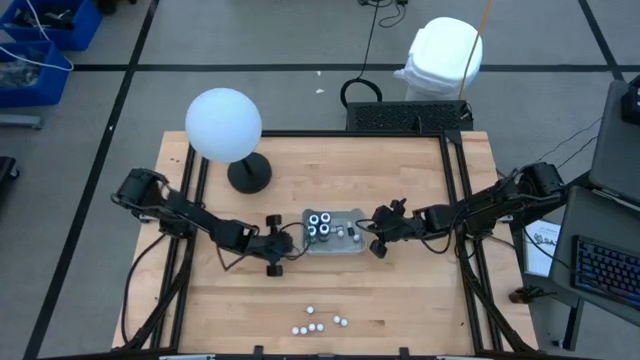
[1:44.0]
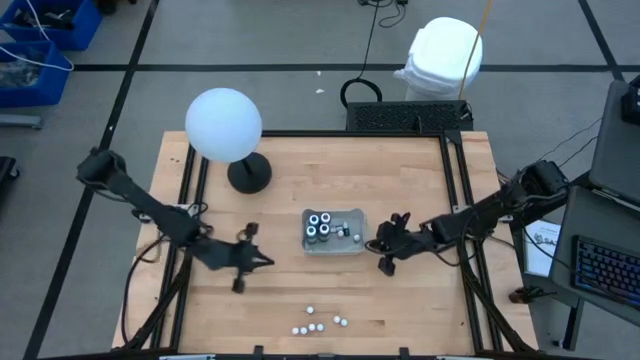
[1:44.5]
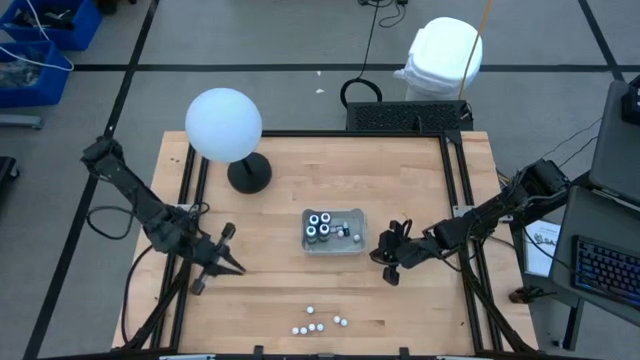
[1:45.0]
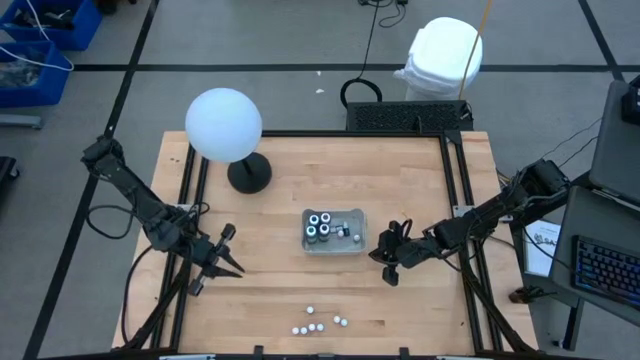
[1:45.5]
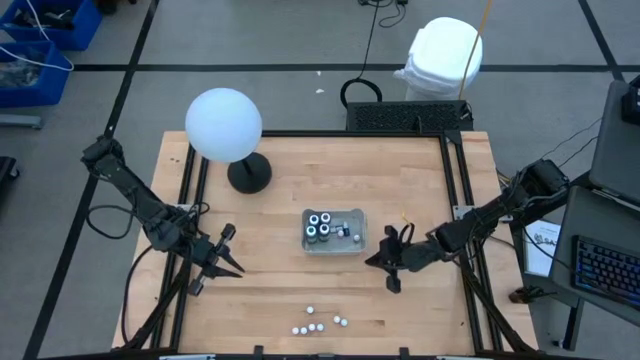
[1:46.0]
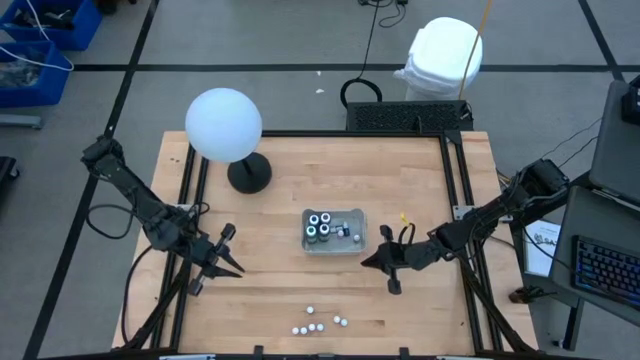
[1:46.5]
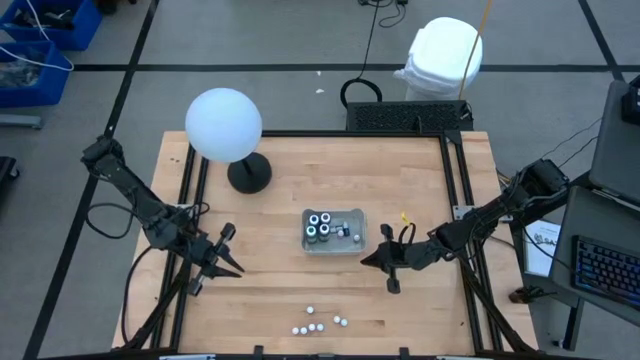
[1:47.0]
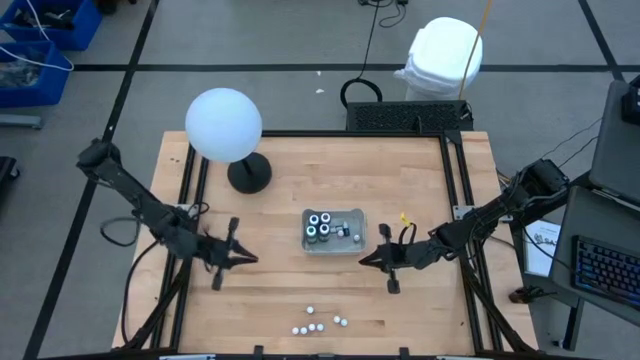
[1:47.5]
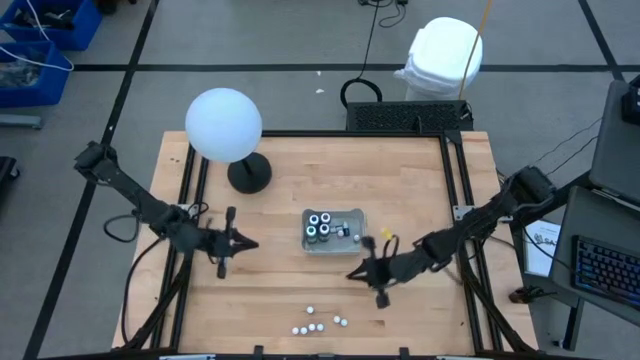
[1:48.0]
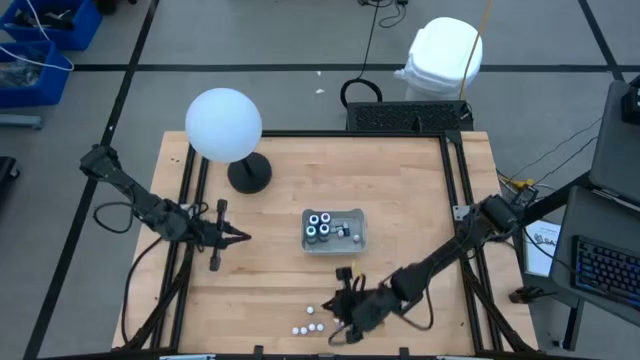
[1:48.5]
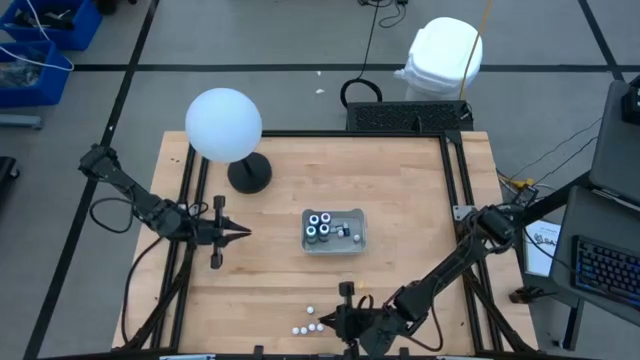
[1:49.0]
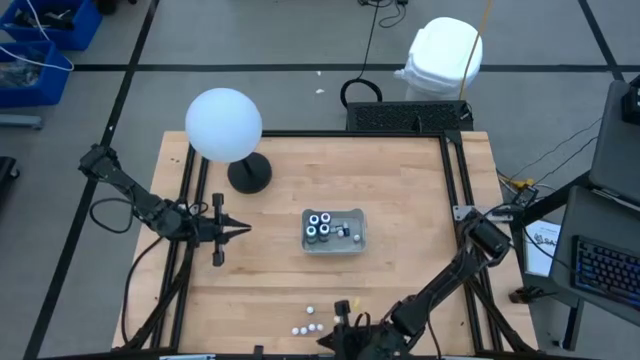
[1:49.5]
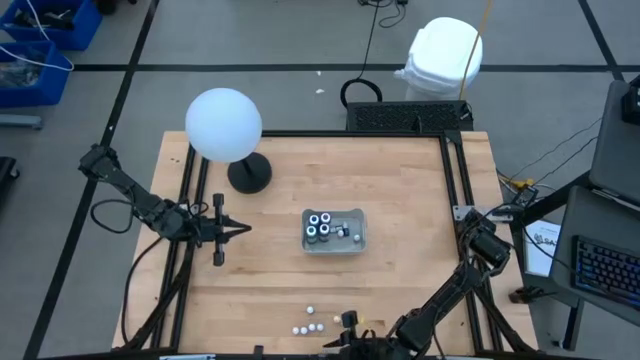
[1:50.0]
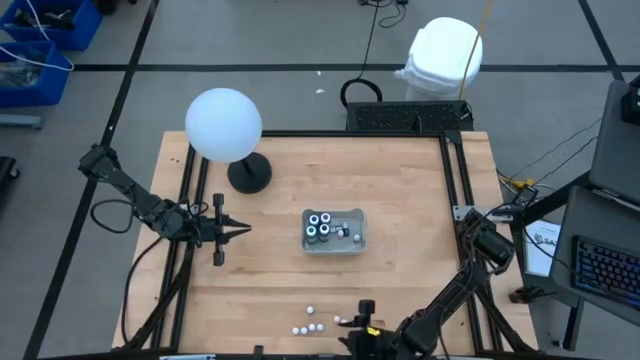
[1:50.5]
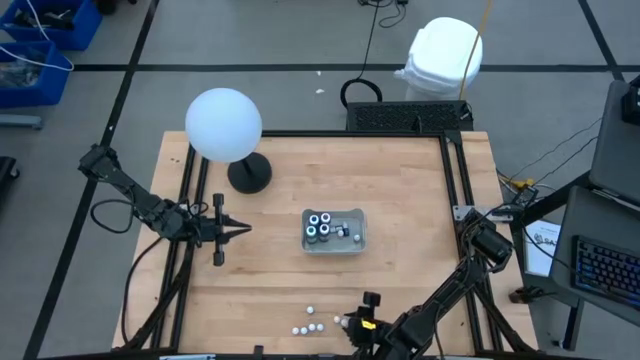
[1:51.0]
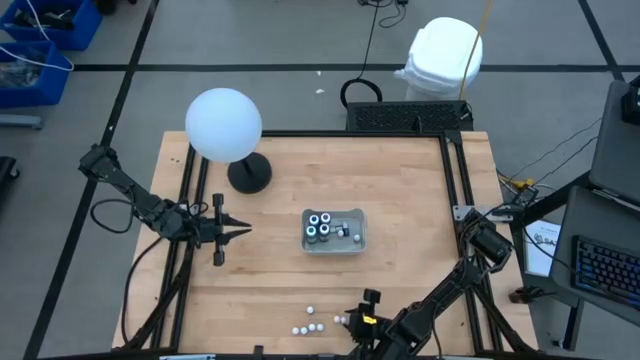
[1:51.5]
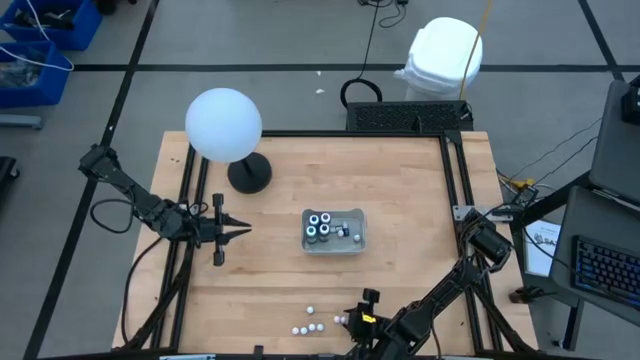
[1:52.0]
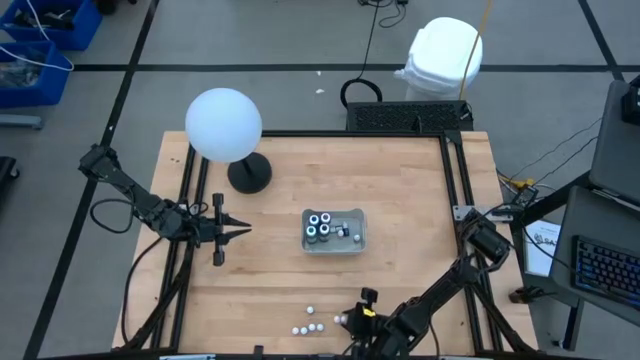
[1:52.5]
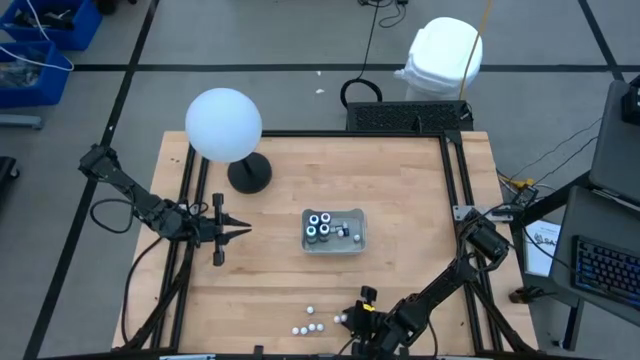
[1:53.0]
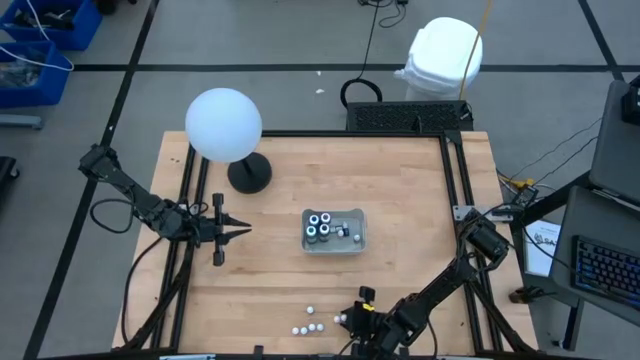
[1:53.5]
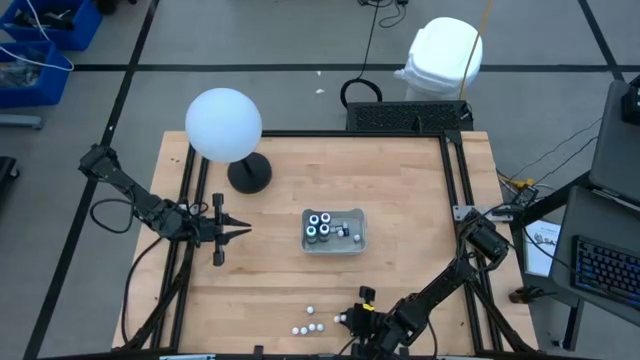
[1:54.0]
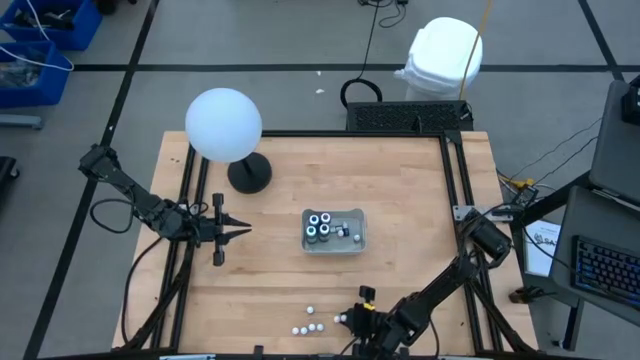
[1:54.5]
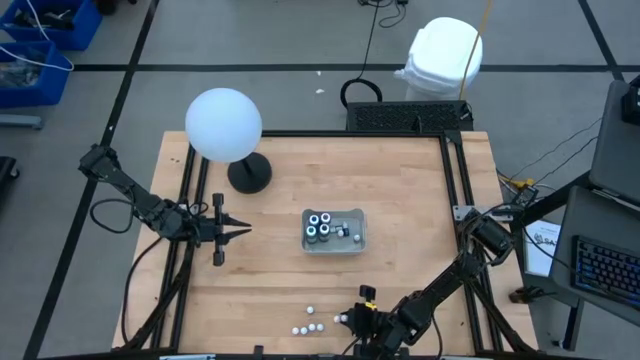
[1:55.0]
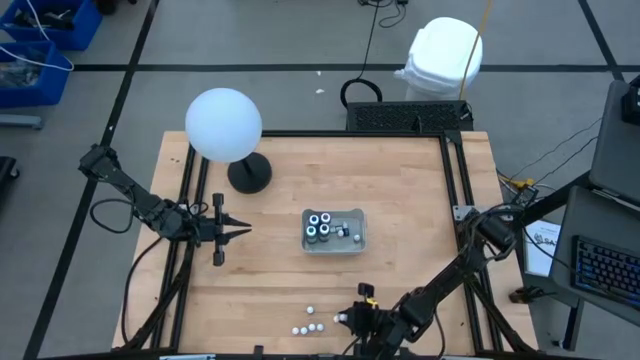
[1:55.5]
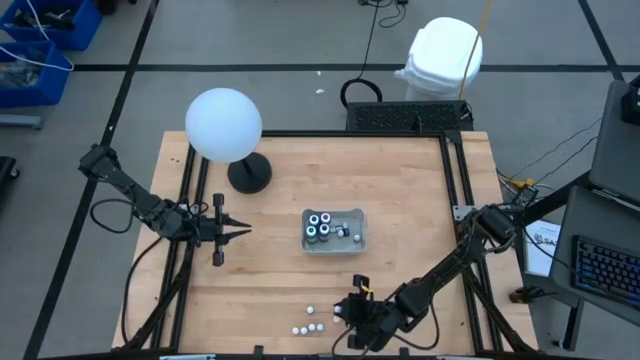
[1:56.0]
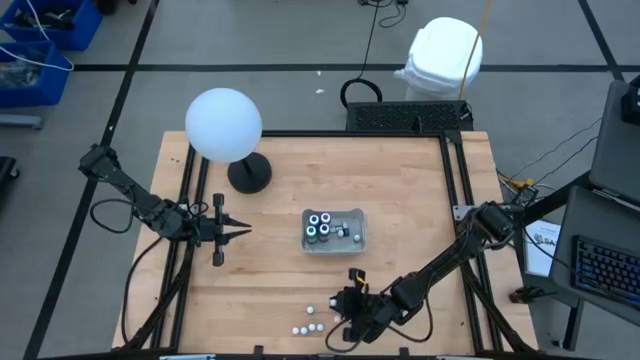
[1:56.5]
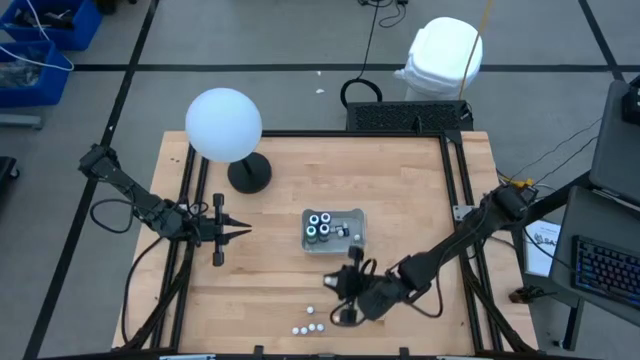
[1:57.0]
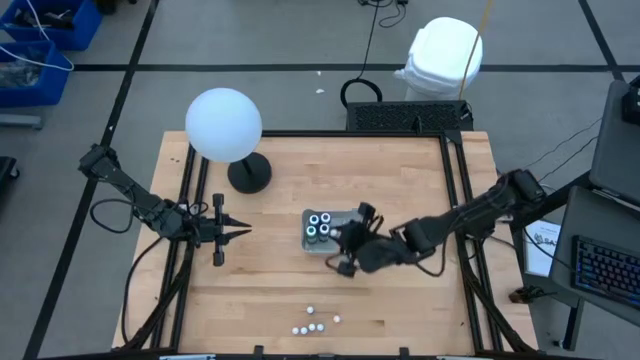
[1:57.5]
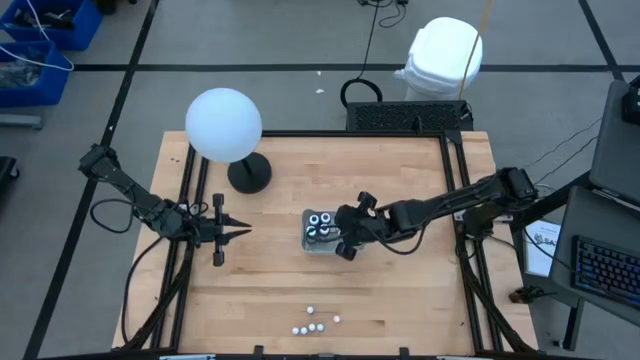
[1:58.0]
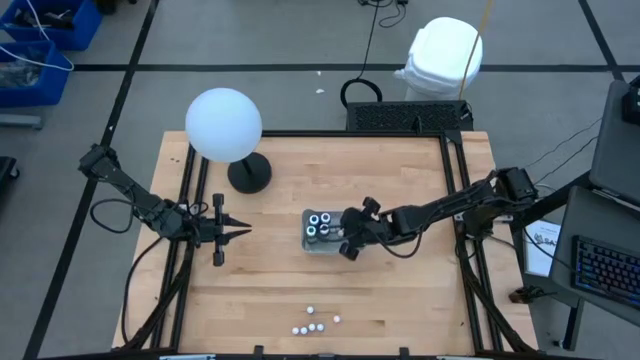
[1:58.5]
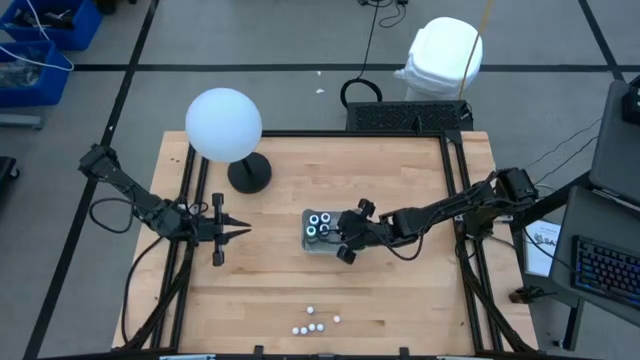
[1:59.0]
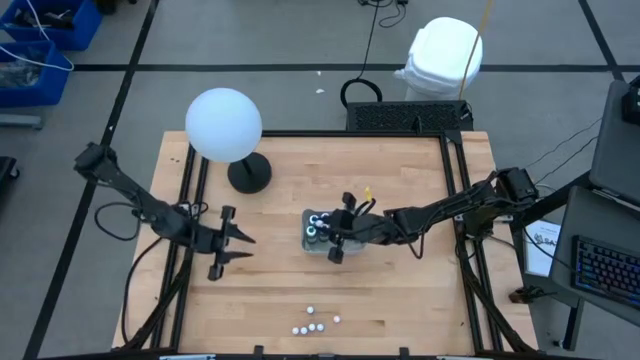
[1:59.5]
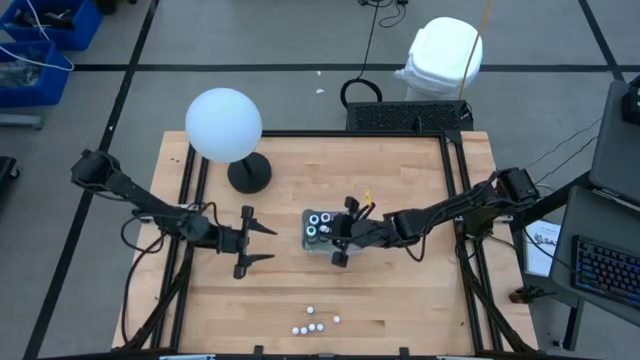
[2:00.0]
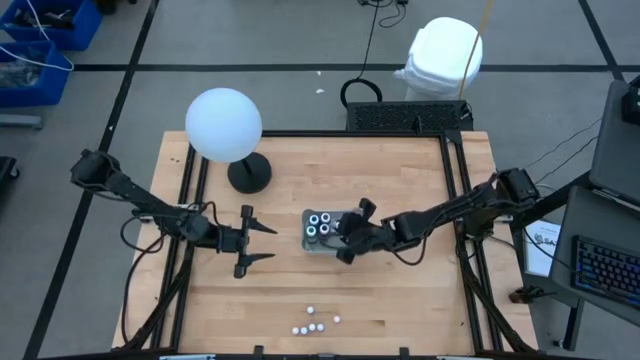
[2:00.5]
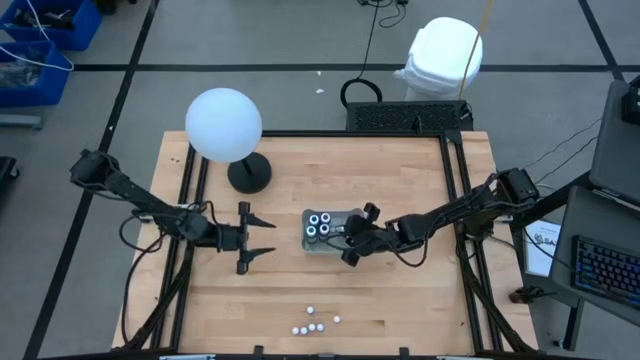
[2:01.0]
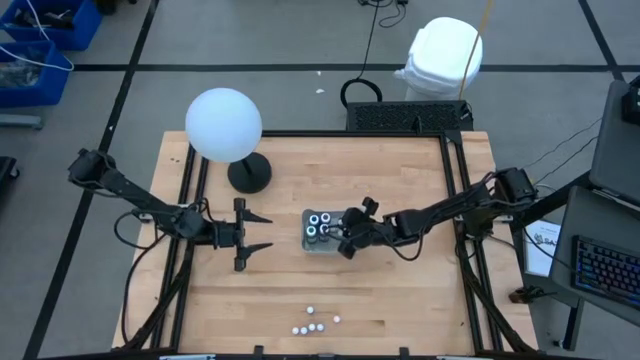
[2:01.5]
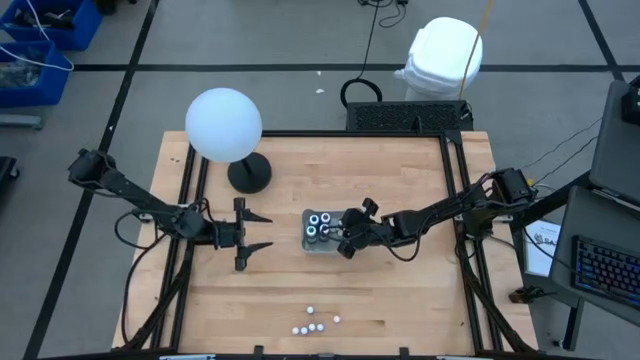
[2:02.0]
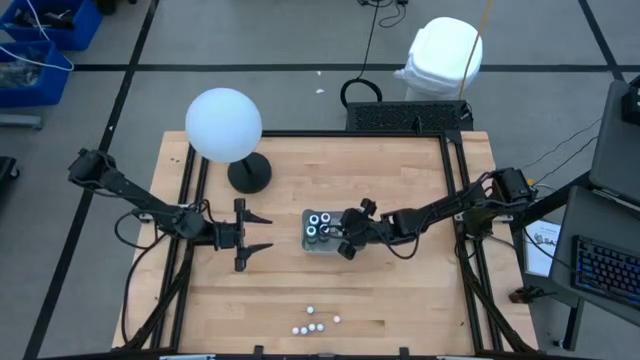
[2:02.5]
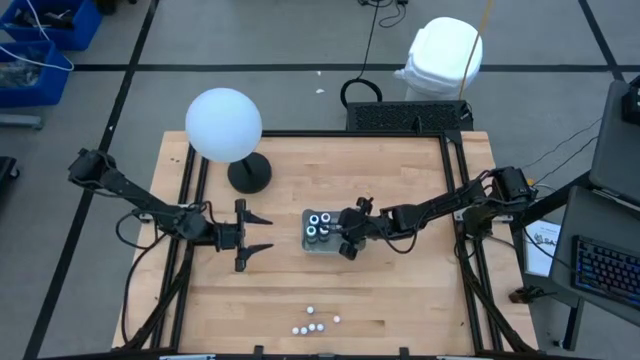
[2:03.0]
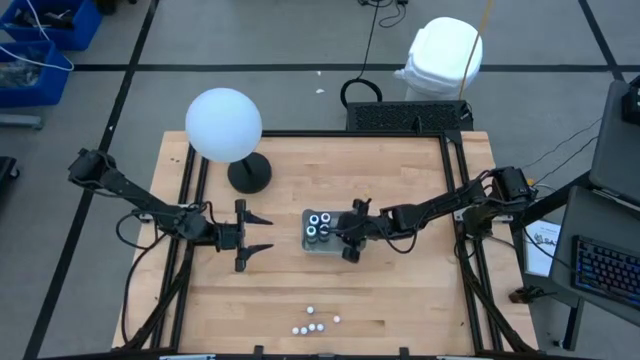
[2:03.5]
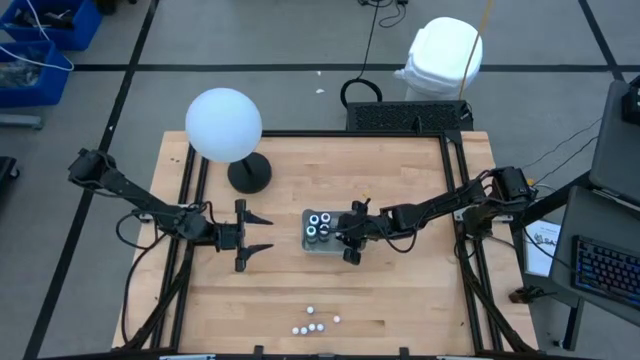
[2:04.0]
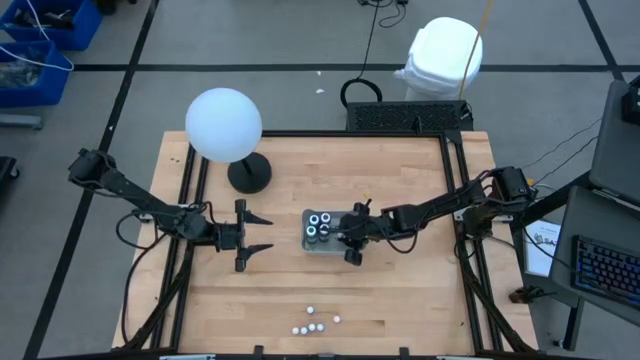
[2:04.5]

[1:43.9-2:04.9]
Task: Pick & Place food coloring
Put the small green food coloring bottle into the gray bin

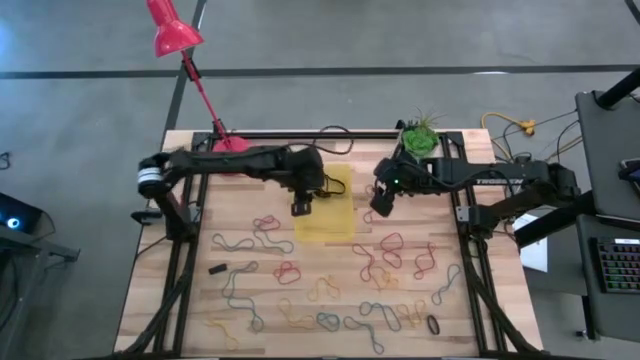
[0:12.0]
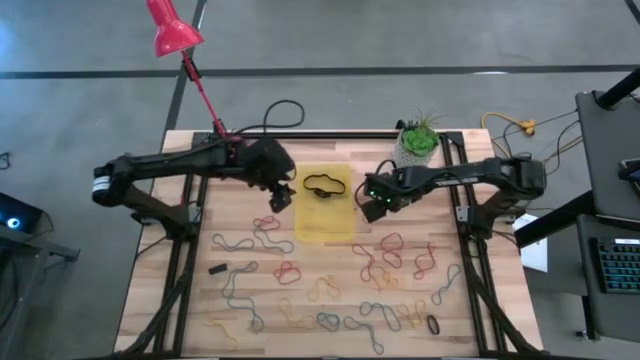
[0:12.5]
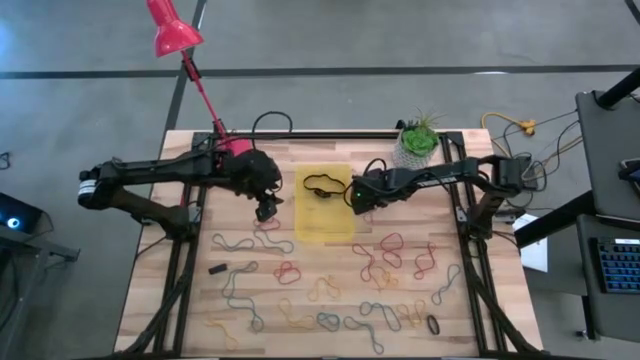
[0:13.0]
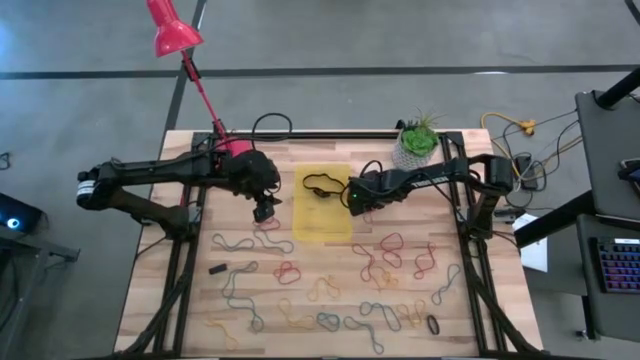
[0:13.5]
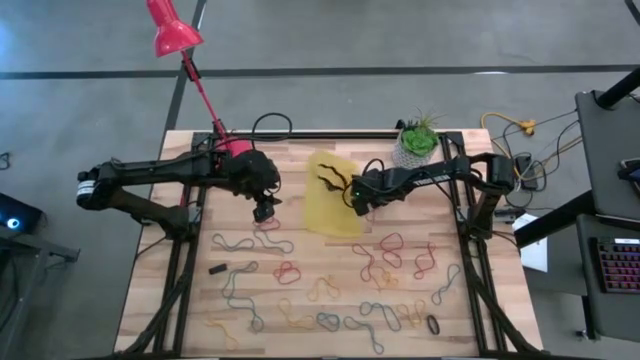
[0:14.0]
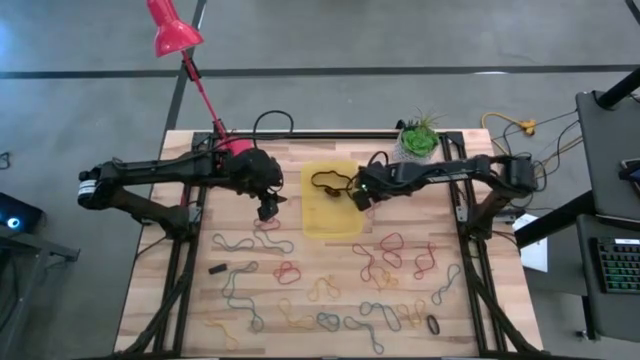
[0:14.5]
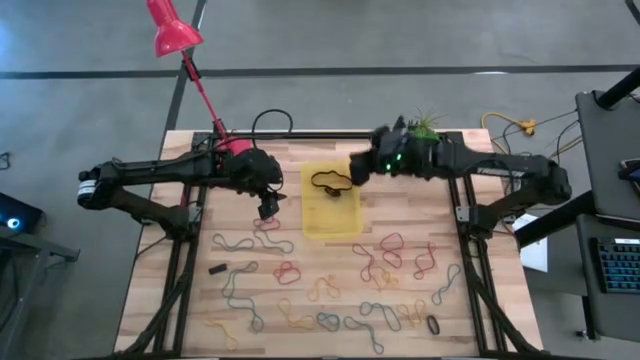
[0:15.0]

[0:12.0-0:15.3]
Task: Pick and place rubber bands into bin
Put the red rubber band into the yellow bin
